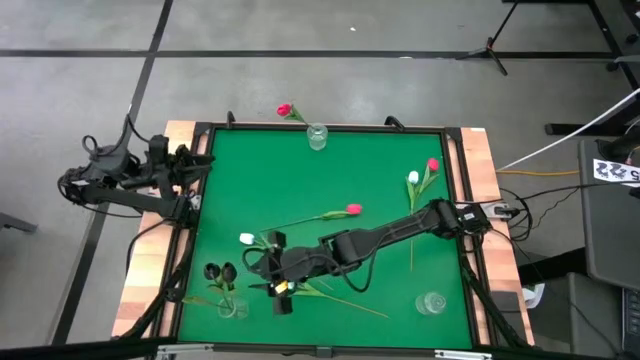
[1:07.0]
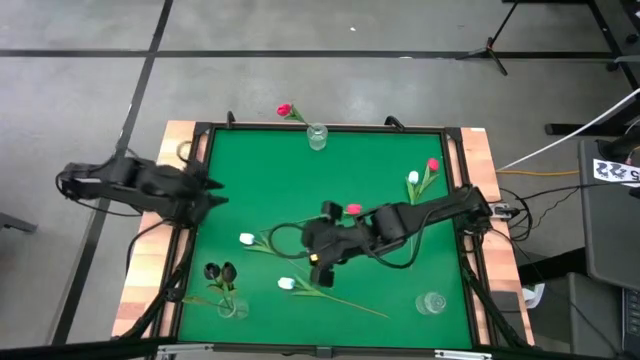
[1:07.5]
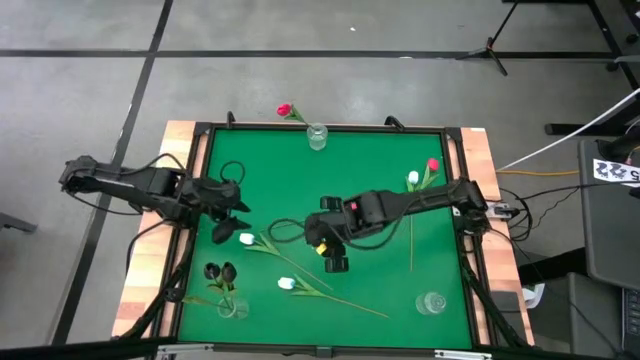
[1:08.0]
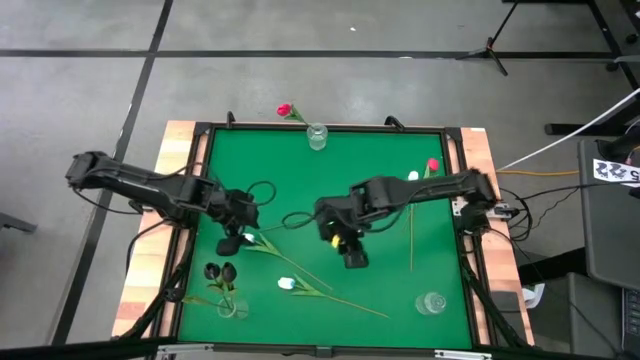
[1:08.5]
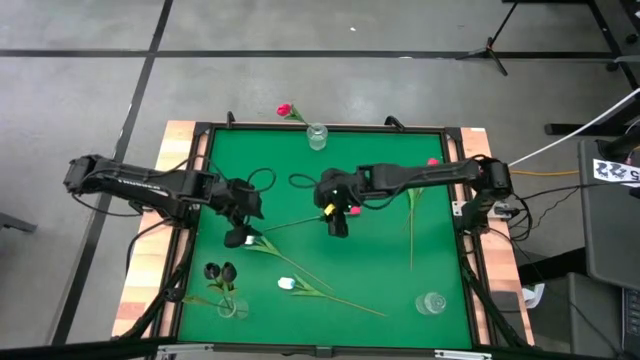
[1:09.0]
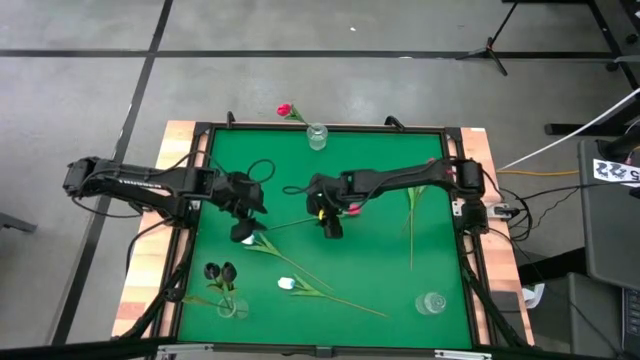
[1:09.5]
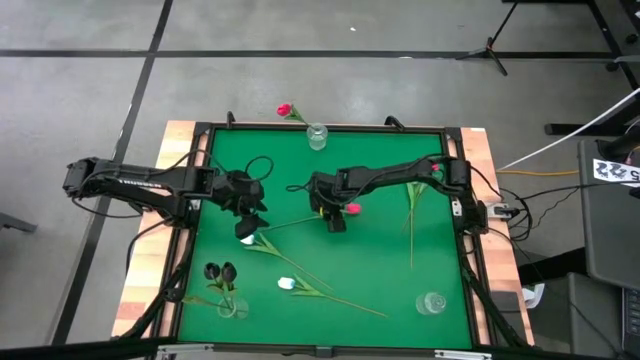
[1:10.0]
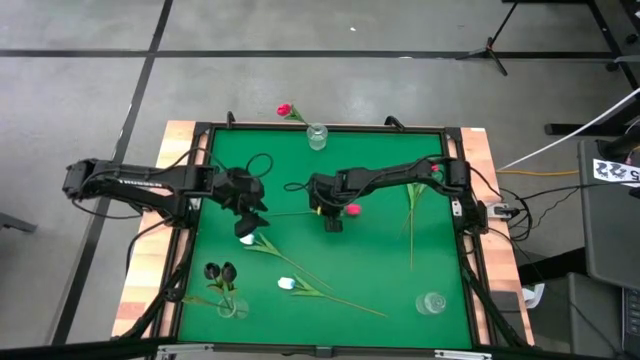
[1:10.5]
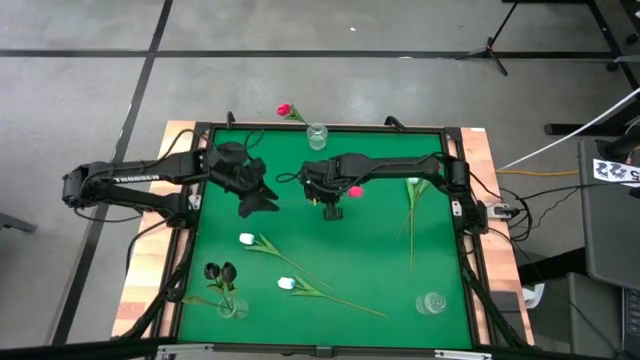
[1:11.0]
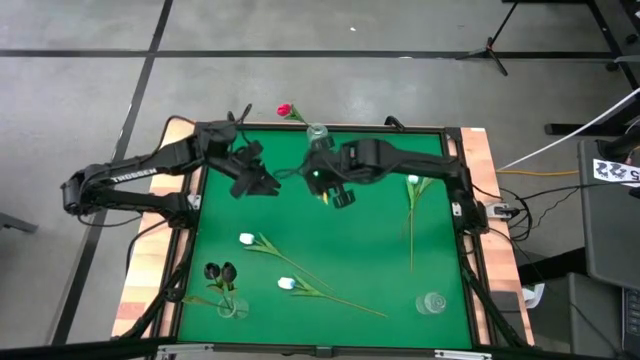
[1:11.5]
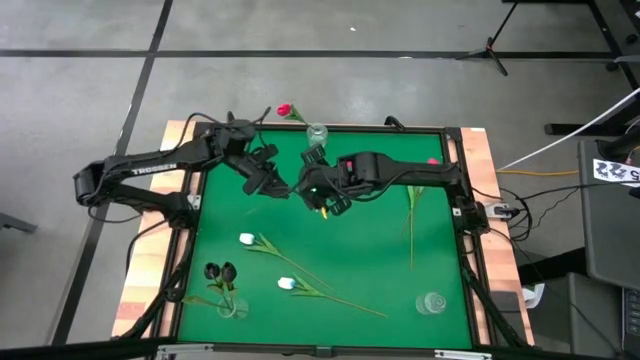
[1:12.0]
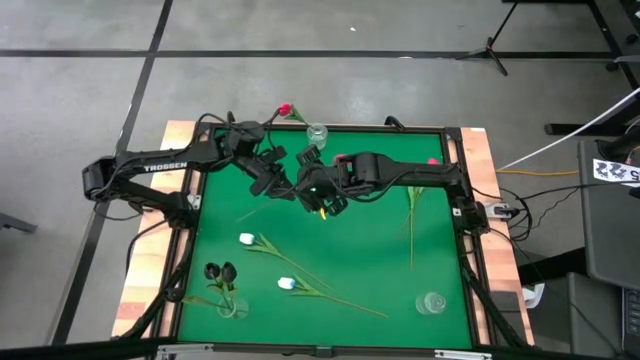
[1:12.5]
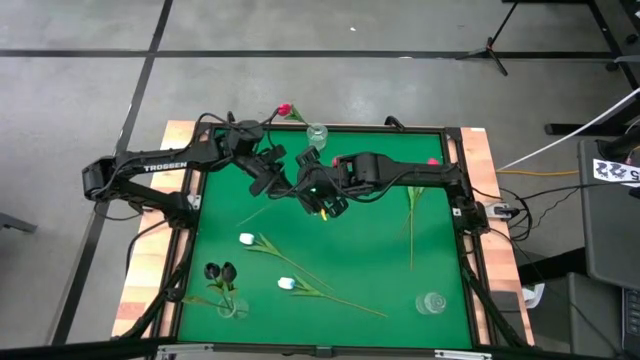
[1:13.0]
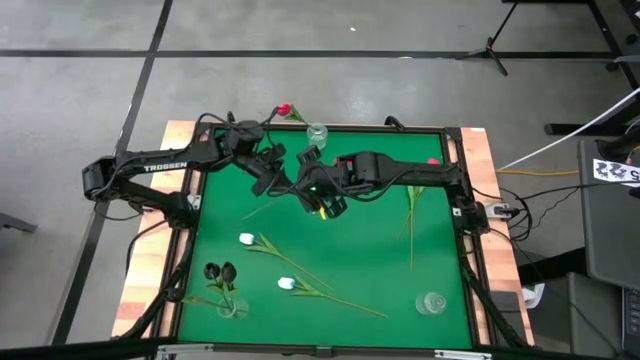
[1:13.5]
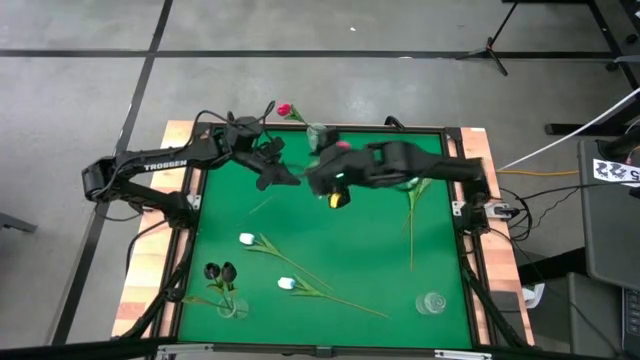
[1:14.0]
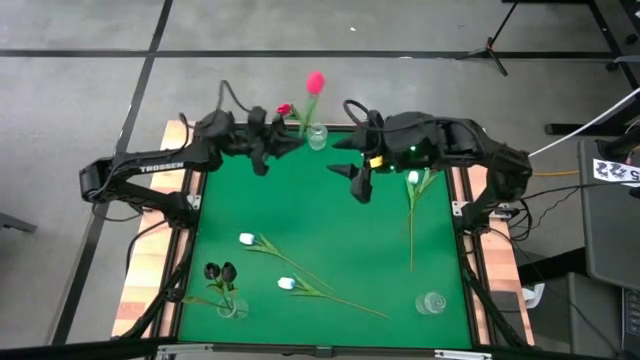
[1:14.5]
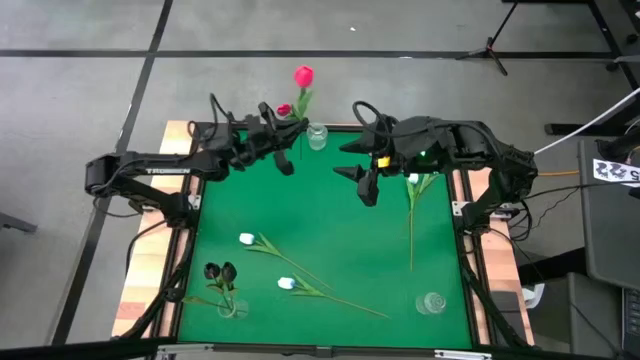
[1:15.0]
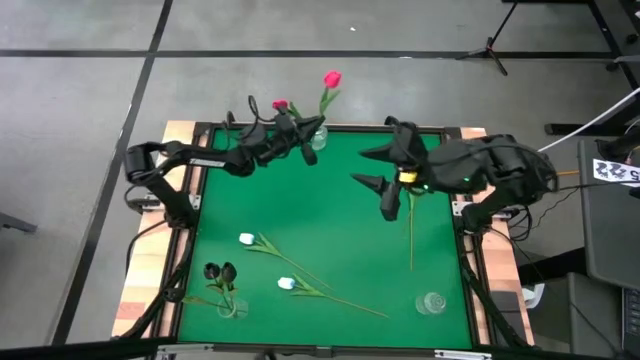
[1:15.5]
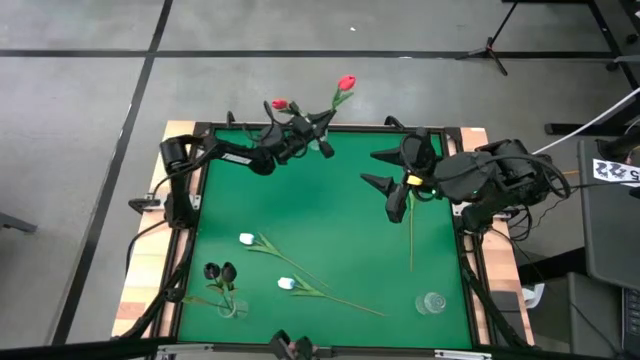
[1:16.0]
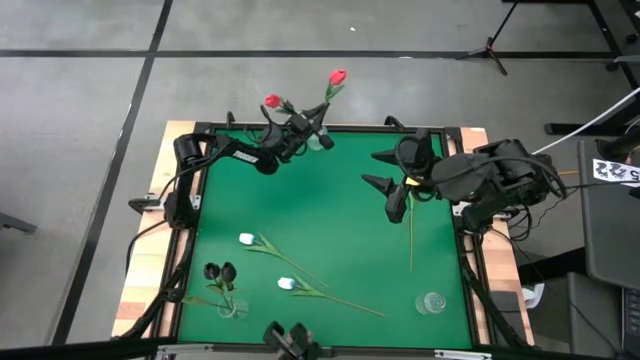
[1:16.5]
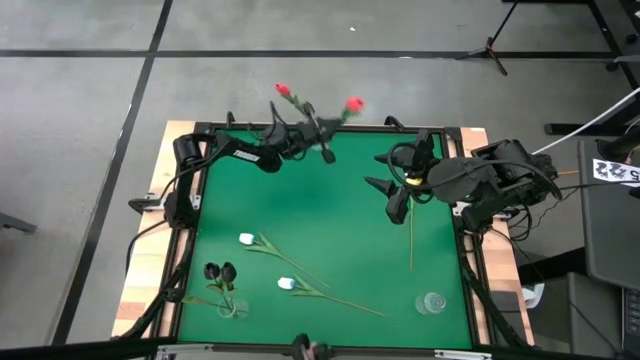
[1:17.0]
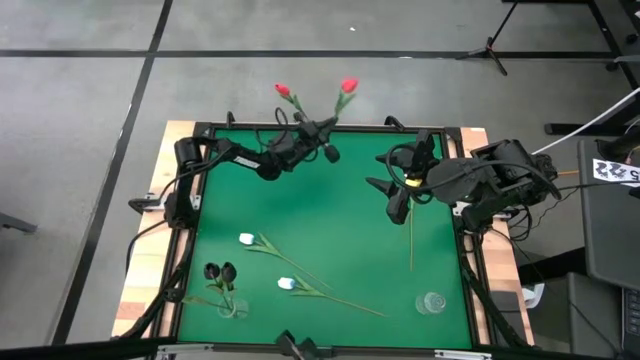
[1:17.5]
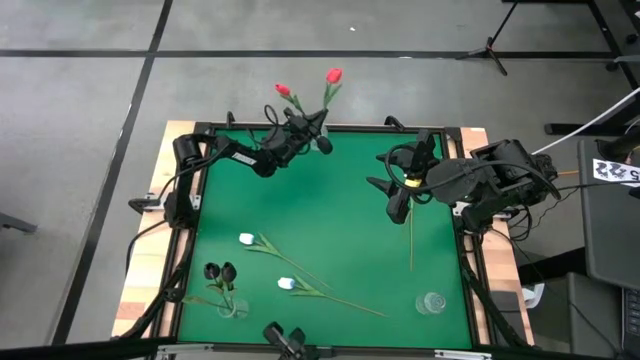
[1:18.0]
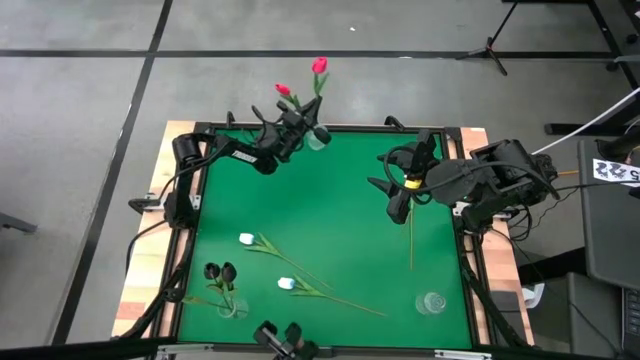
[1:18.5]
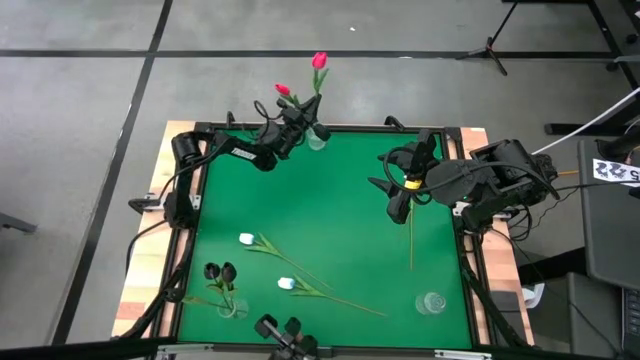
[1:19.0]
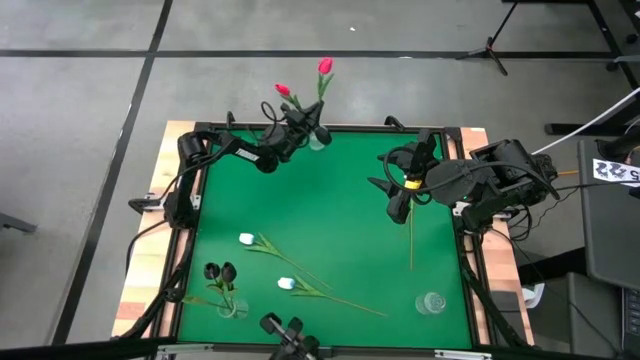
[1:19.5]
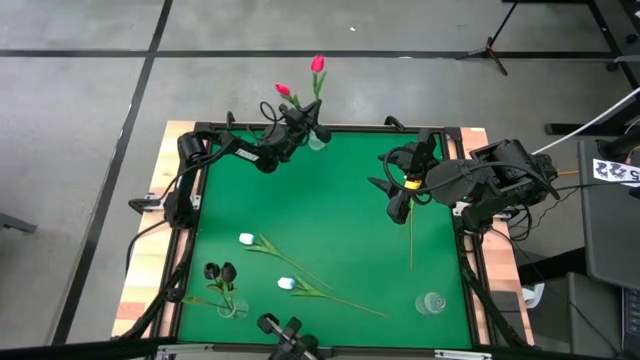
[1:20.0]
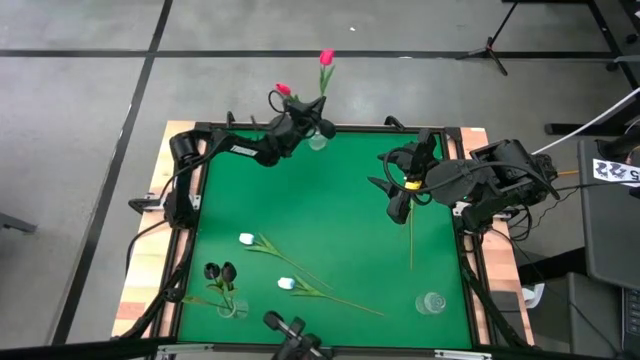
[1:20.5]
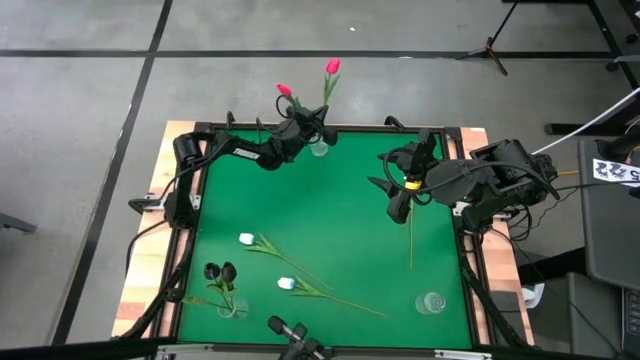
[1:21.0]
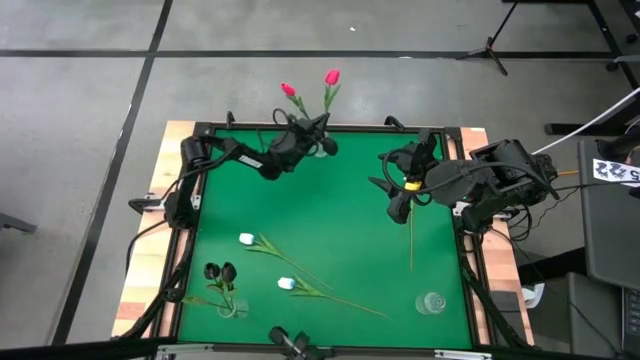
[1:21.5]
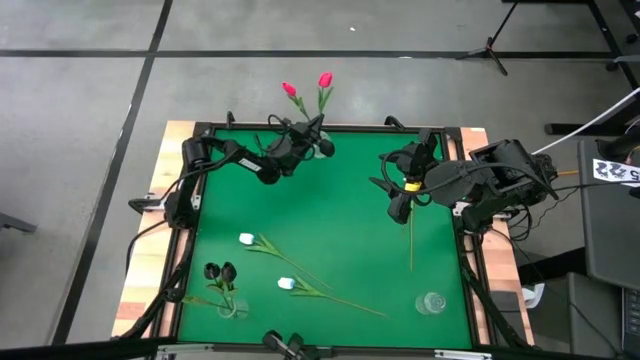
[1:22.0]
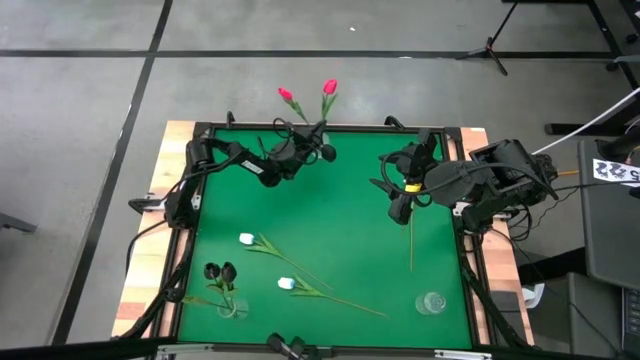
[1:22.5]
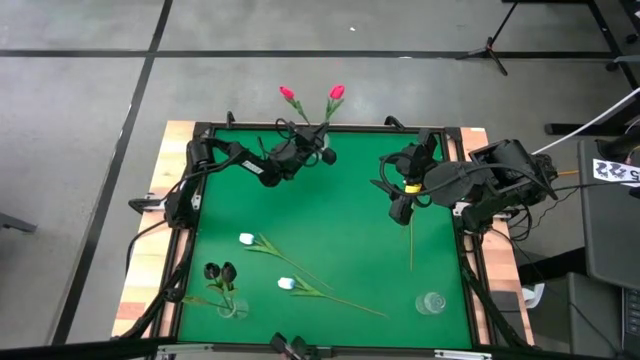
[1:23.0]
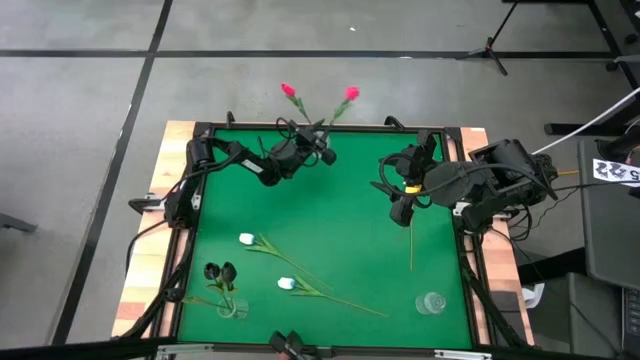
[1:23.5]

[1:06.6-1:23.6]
Task: Sort flowers into vase by color
Put the left pink flower into the top transparent vase

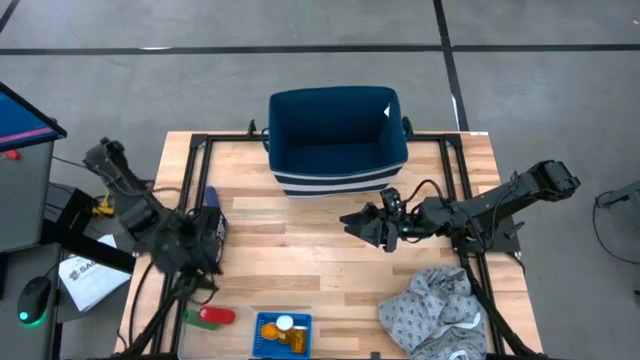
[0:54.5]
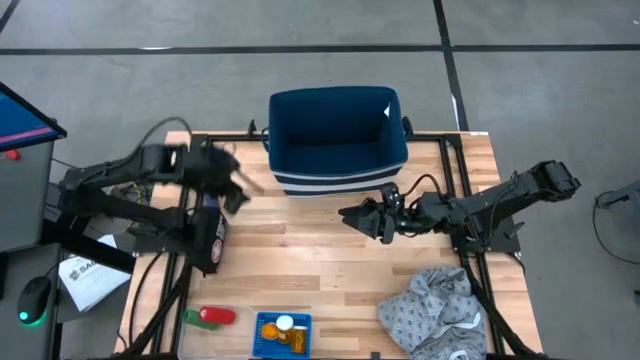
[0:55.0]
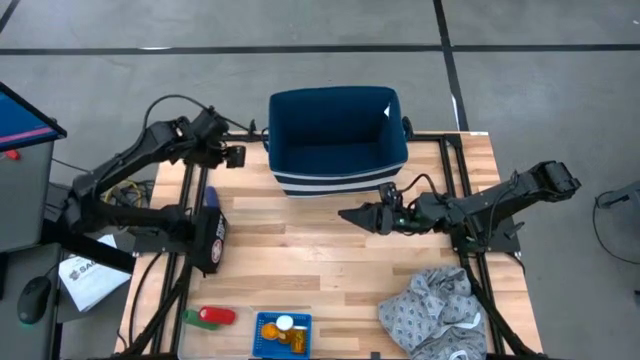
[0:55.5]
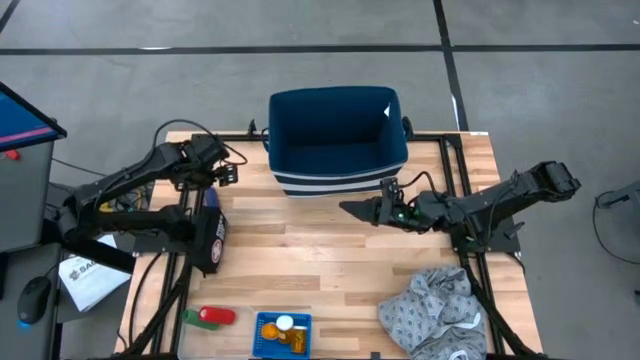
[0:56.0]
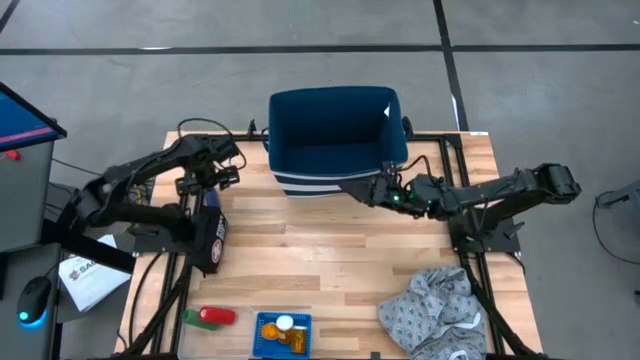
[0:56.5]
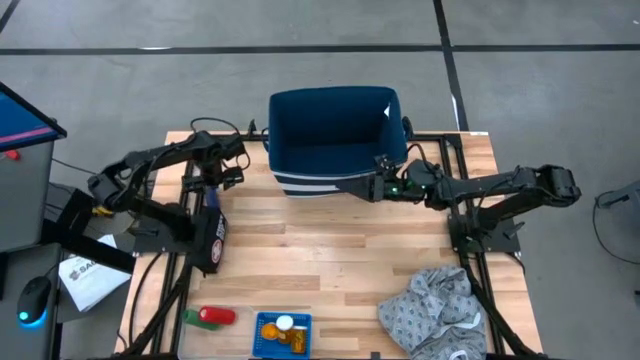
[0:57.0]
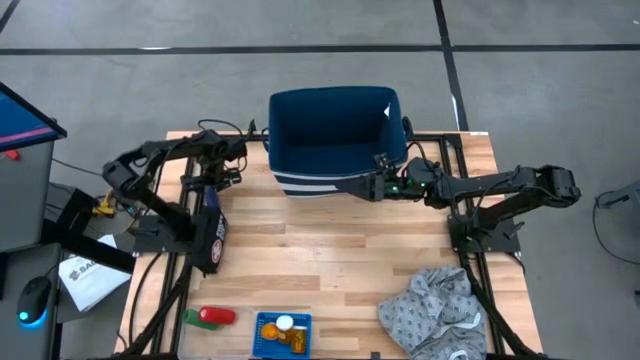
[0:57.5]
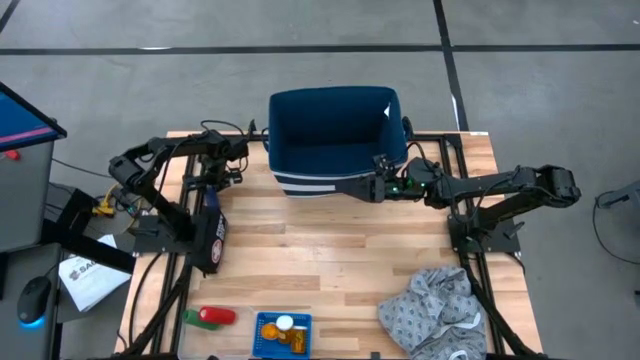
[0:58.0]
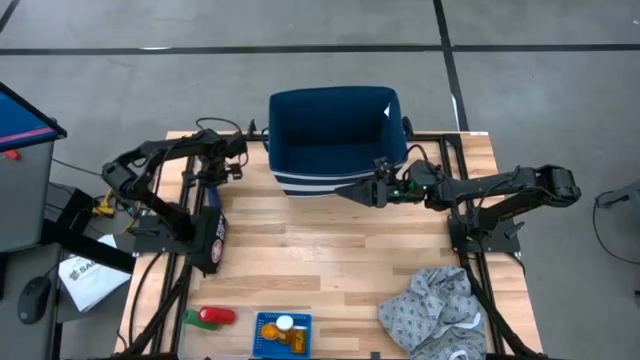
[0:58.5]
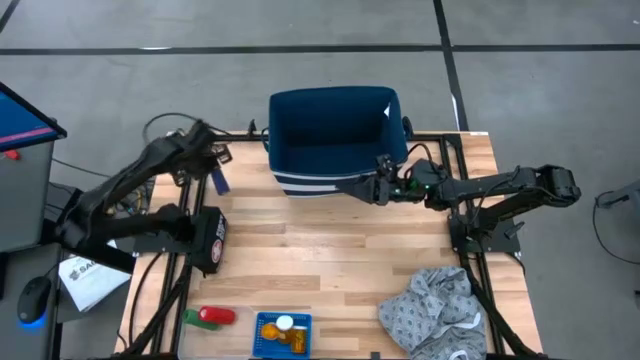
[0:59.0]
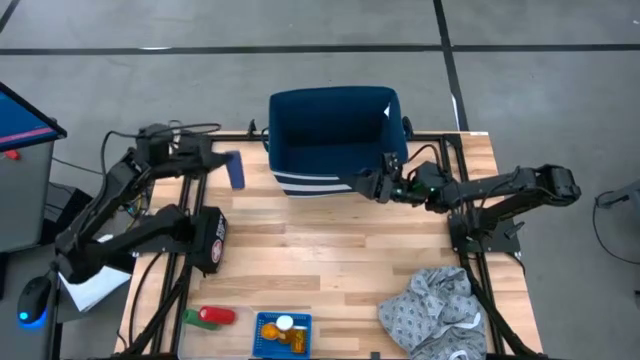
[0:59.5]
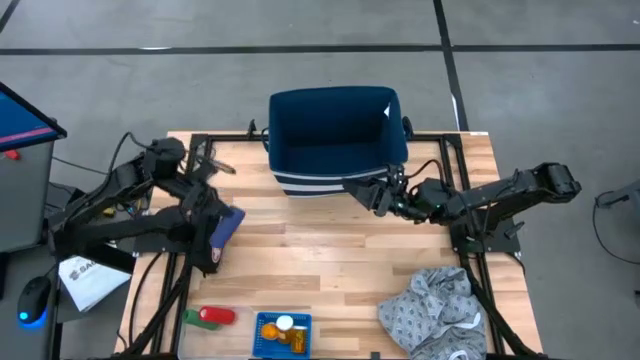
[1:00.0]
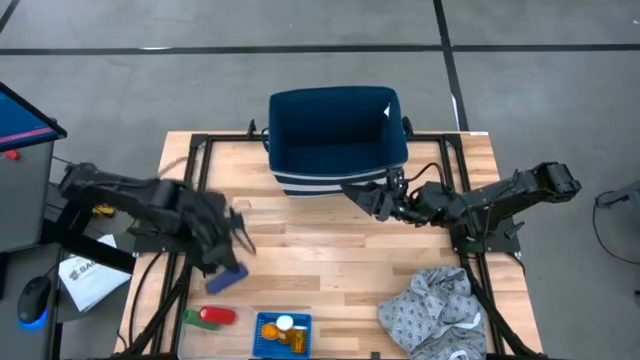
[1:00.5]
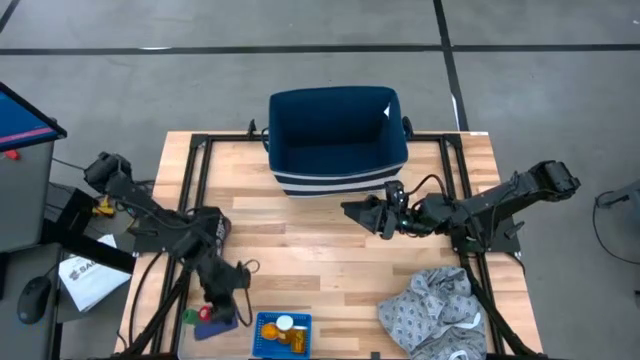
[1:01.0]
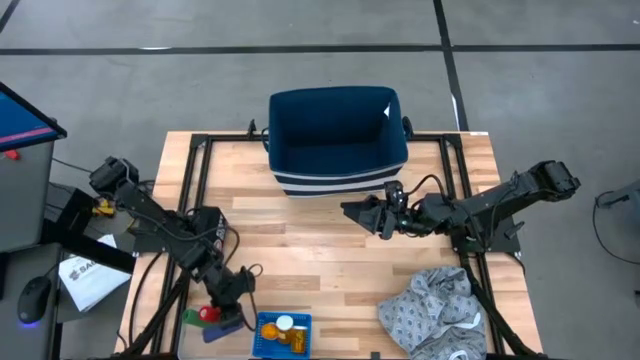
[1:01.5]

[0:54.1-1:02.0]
Task: Pick & place medical supplies in basket/bin
Put the blue bandage into the transparent bin
